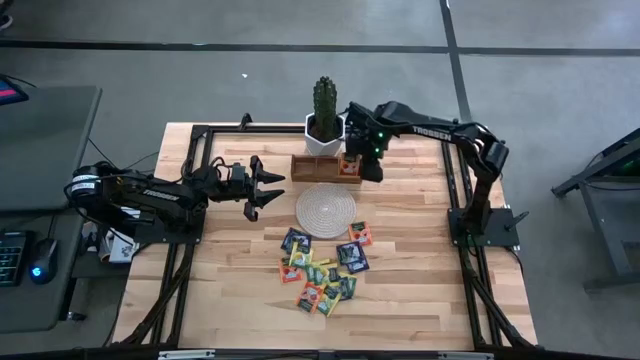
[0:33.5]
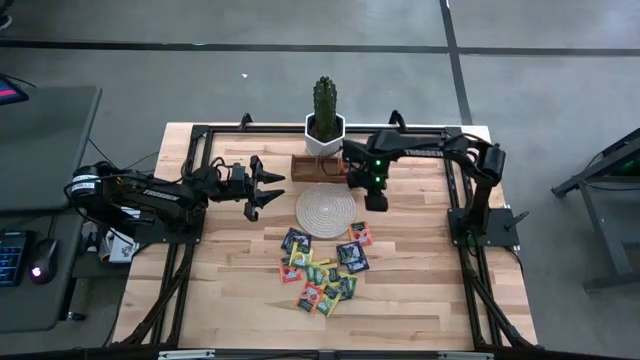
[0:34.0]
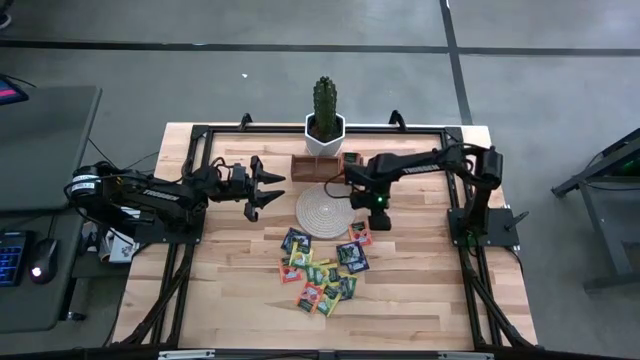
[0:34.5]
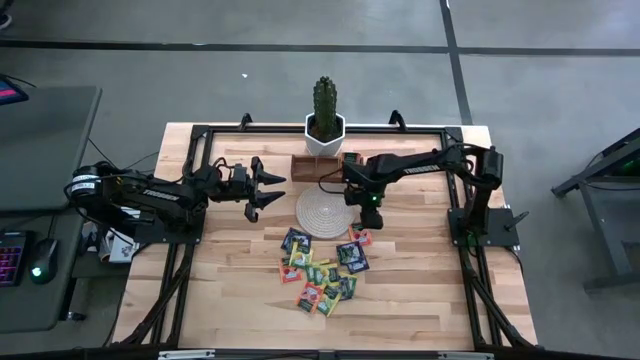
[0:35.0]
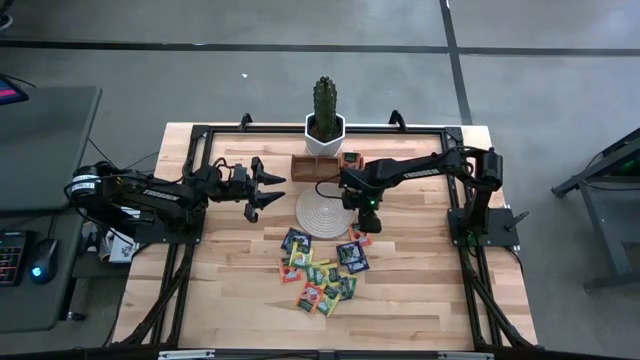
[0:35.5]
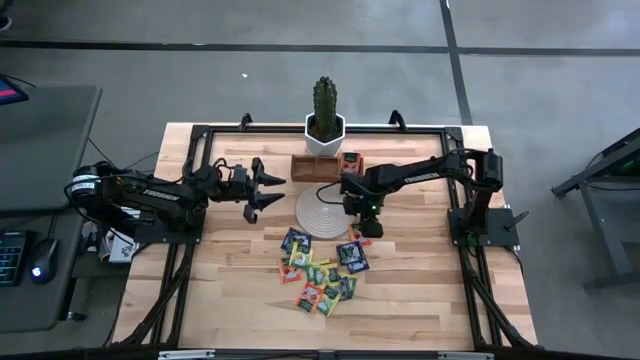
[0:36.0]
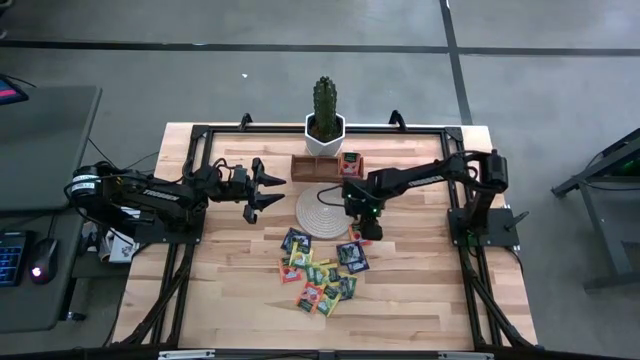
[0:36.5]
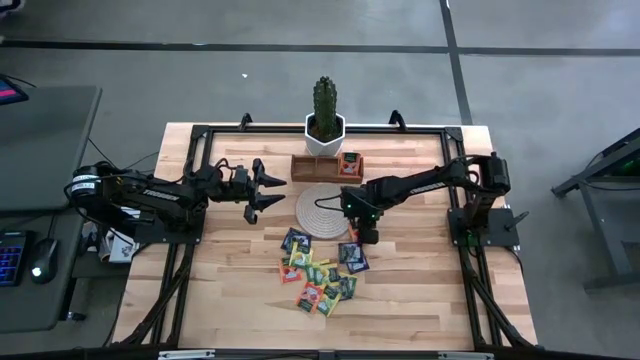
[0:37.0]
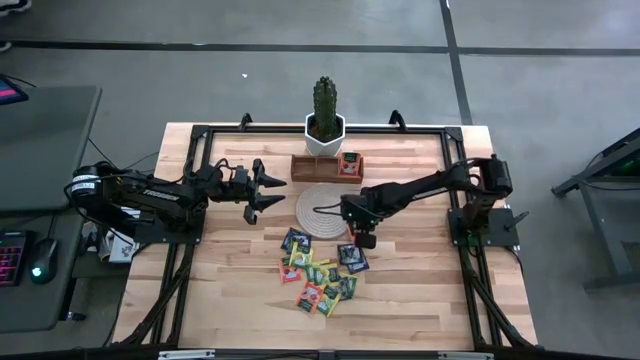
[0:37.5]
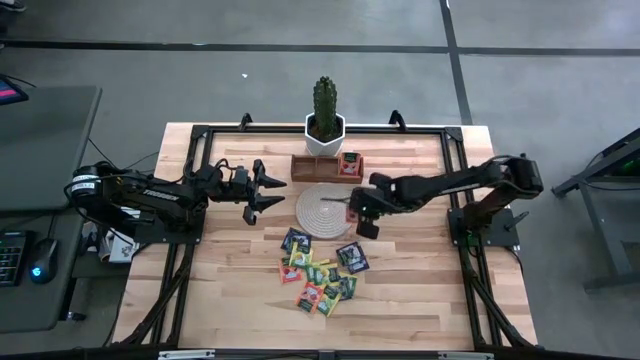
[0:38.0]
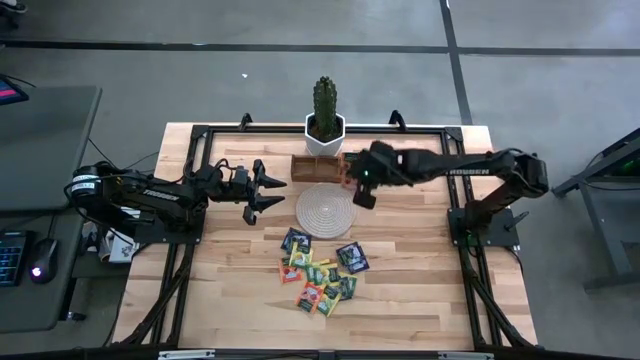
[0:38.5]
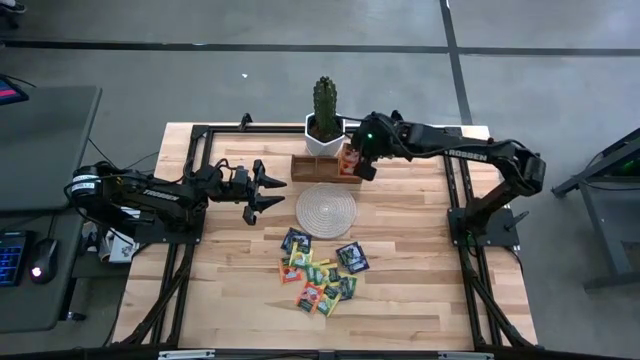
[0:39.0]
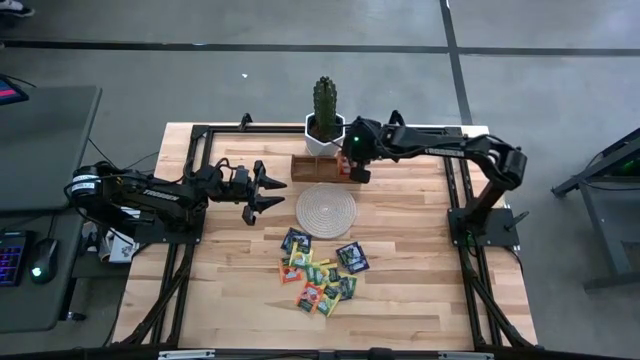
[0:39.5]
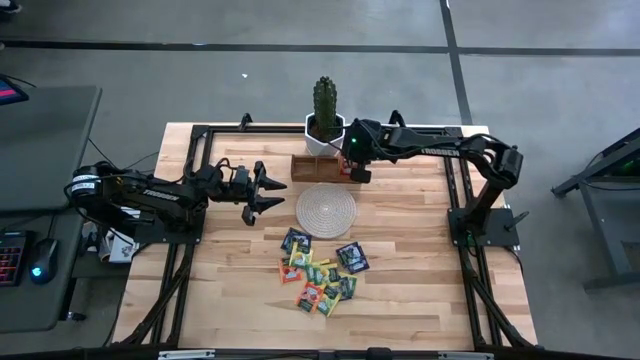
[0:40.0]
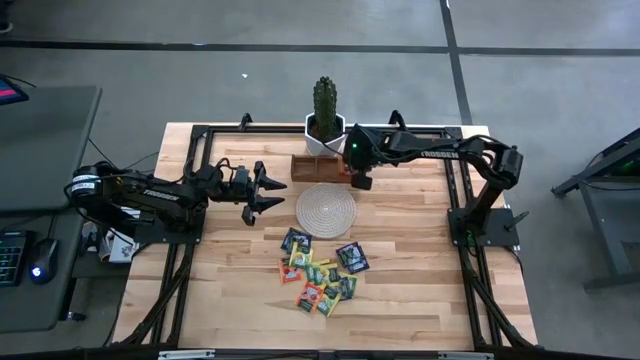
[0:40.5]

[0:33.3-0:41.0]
Task: Pick & Place Tea
Put the orange tea bag into the right section of the wooden organizer

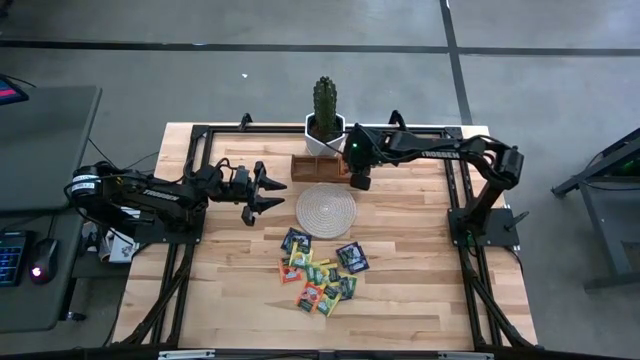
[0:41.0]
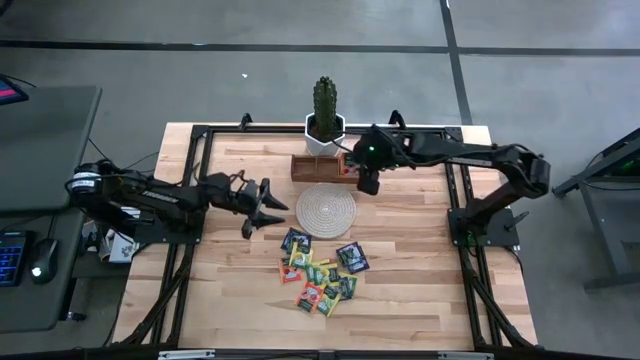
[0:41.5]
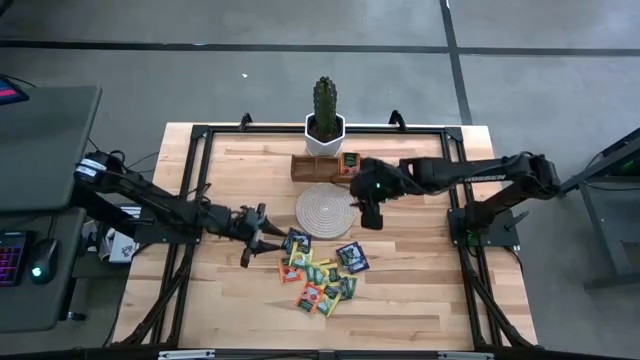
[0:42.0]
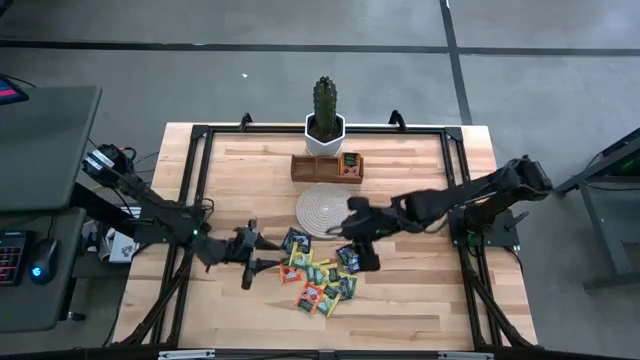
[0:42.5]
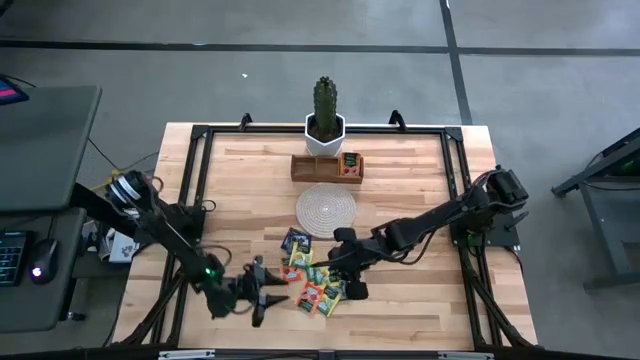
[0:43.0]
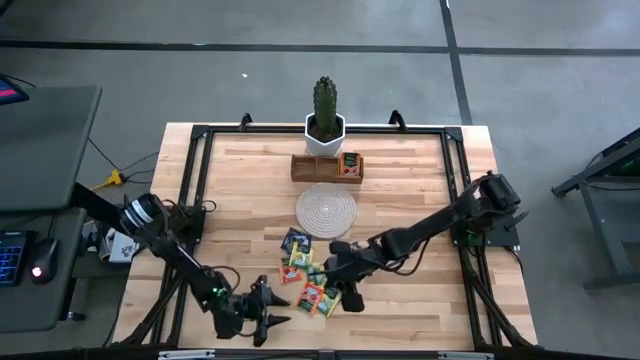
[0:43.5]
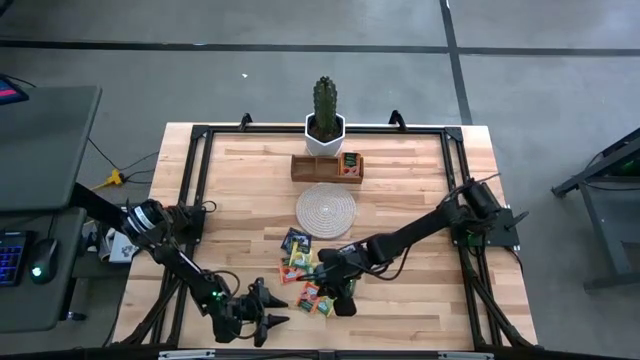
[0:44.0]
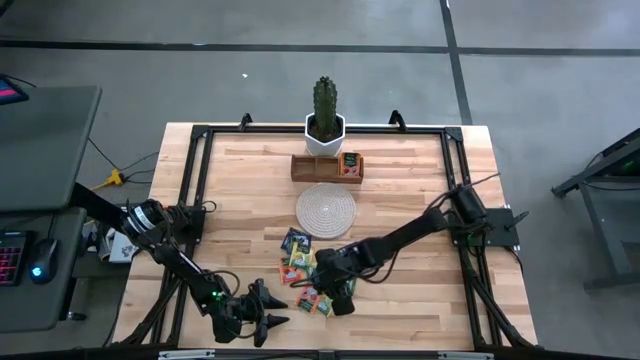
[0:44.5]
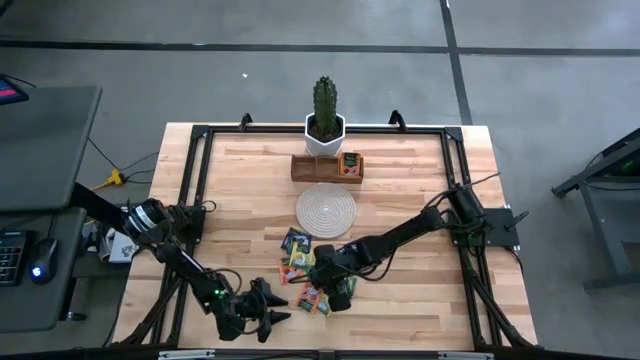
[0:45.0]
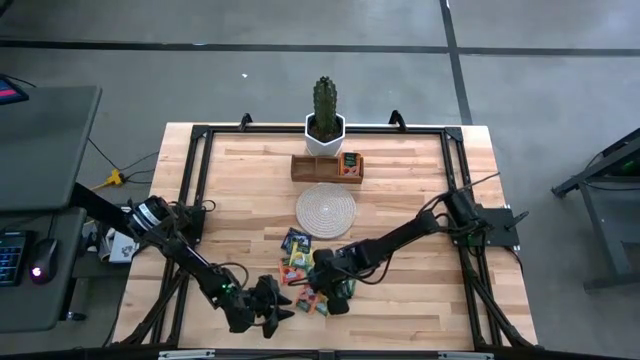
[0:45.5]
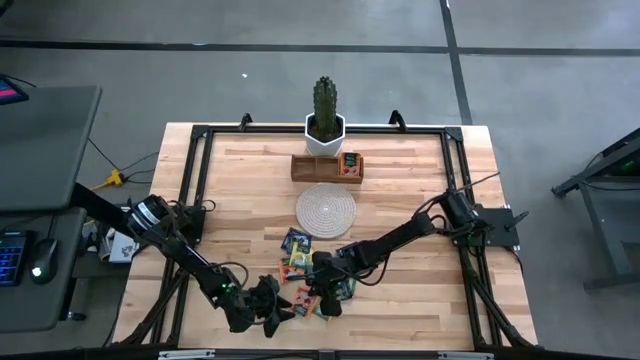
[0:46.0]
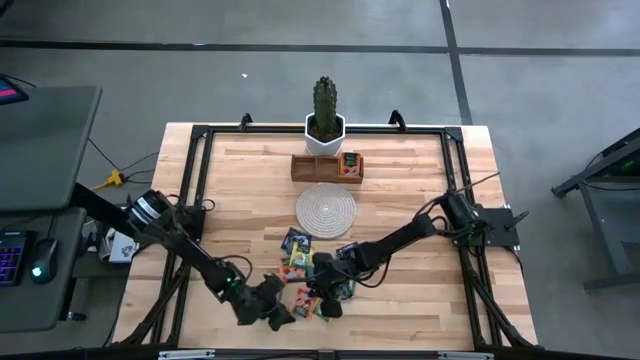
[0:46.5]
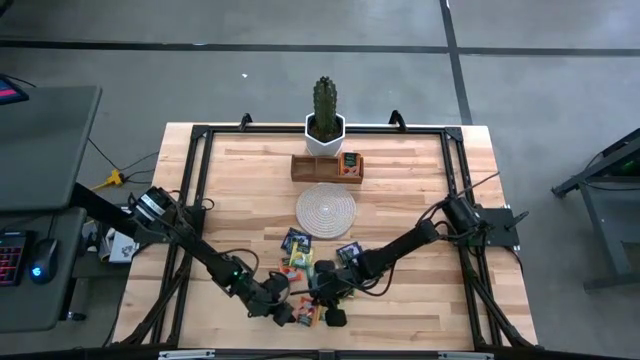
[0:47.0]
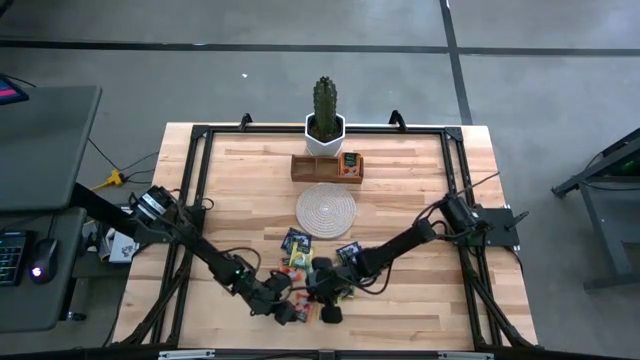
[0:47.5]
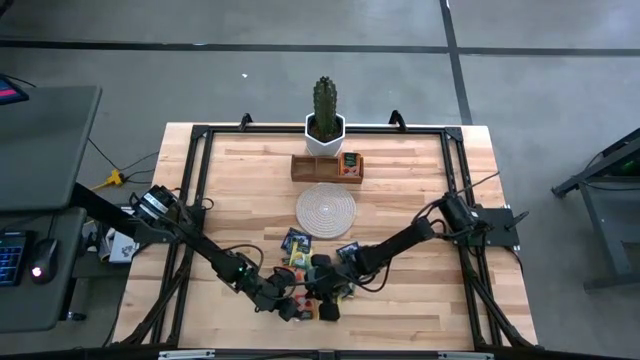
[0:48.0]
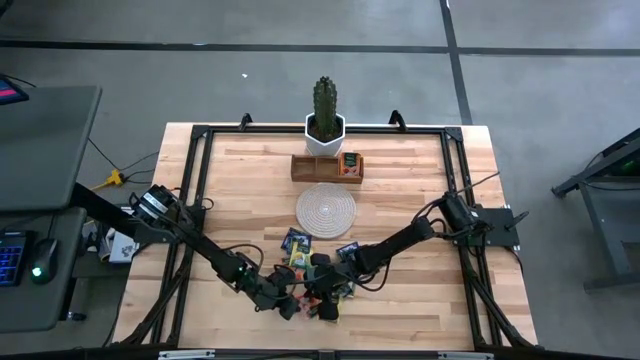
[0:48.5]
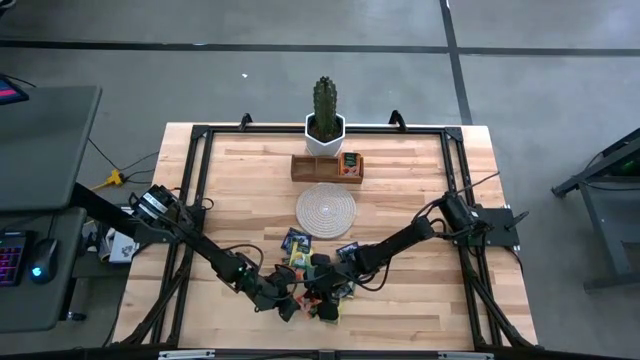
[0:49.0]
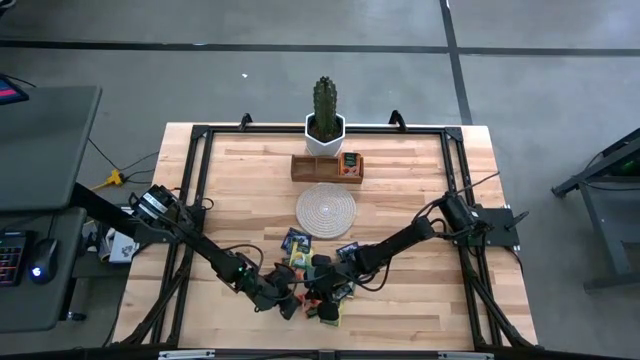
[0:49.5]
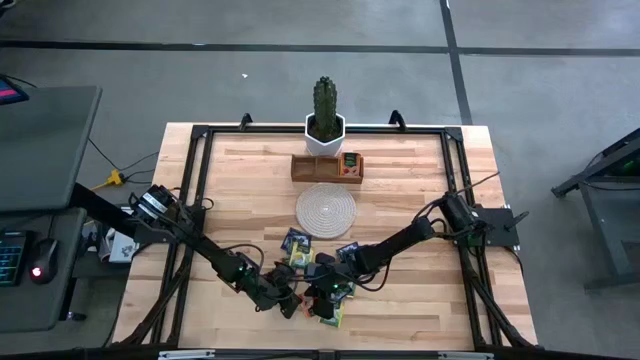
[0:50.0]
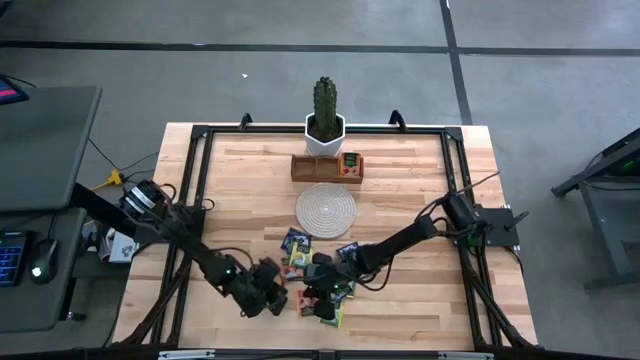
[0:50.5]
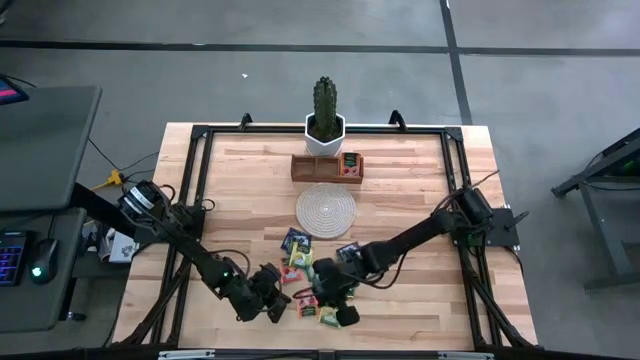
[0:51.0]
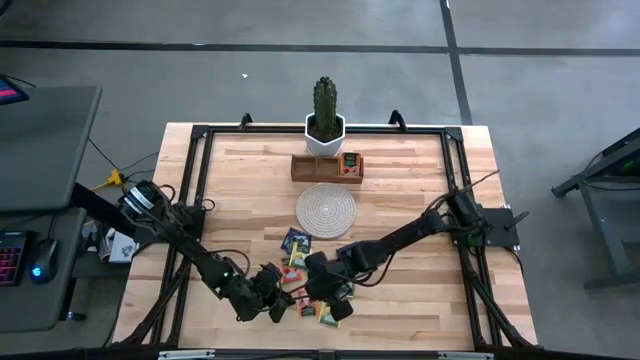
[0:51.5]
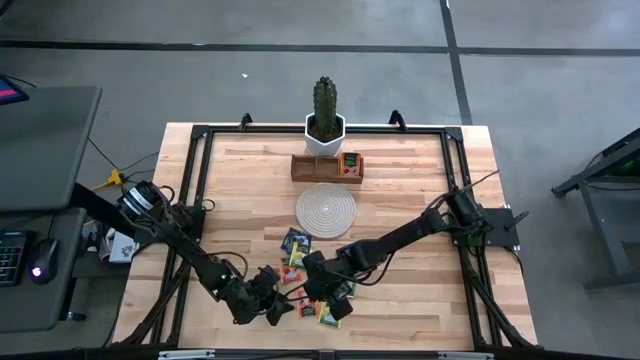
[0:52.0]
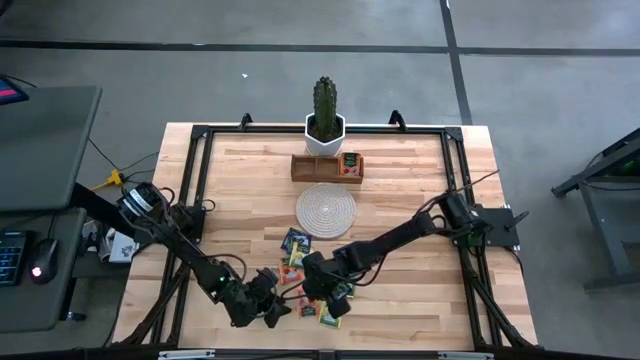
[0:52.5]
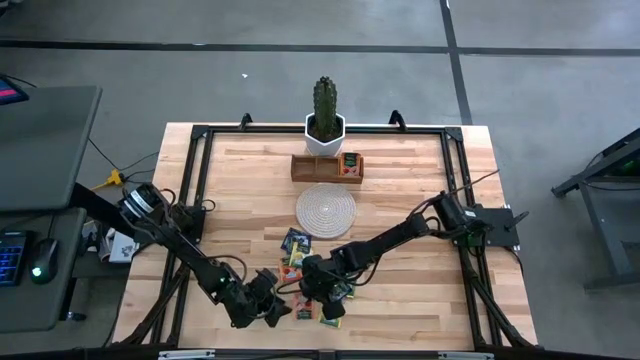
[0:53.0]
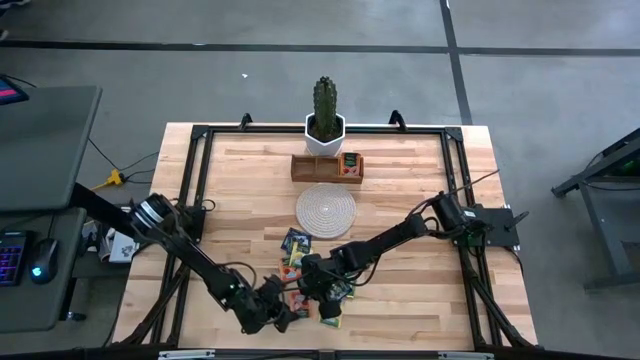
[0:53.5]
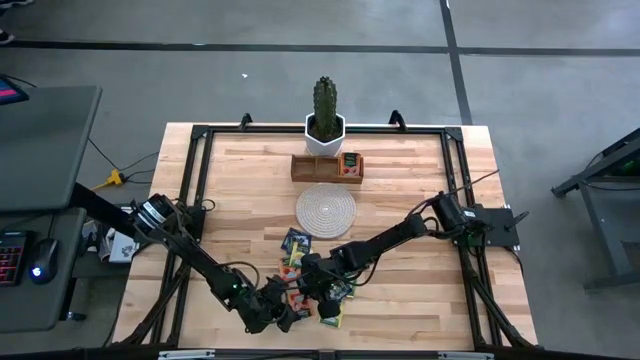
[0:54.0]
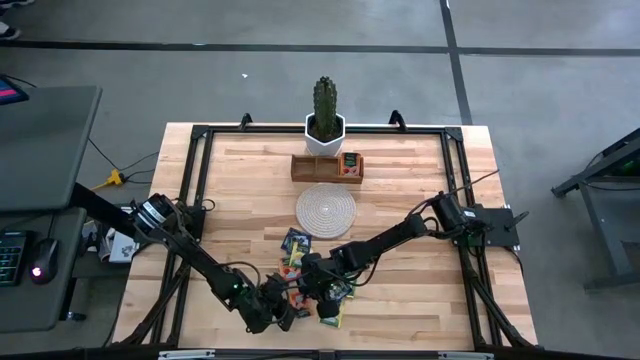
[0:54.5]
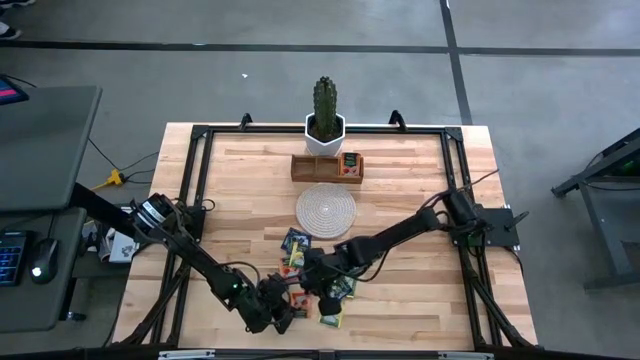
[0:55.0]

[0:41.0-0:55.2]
Put the orange tea bag into the right section of the wooden organizer
